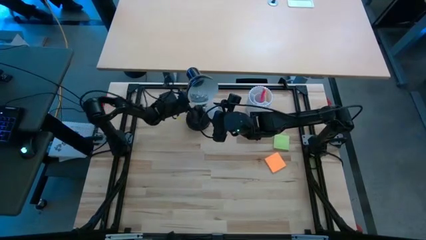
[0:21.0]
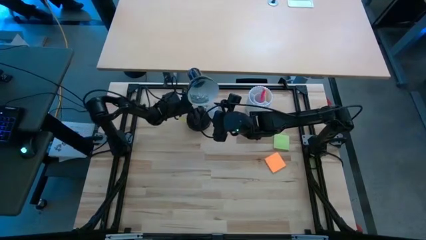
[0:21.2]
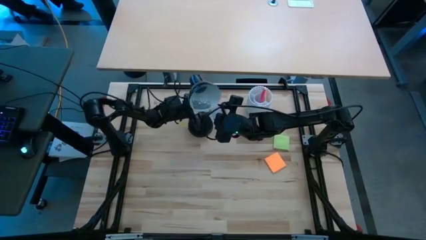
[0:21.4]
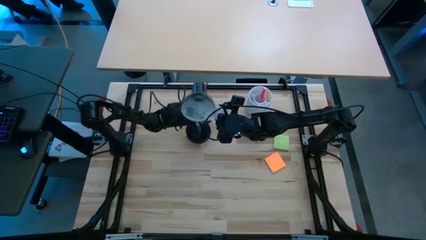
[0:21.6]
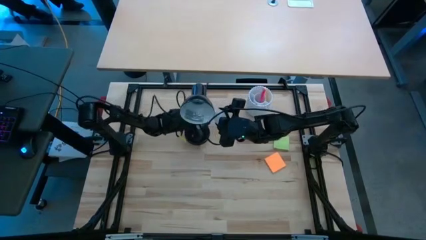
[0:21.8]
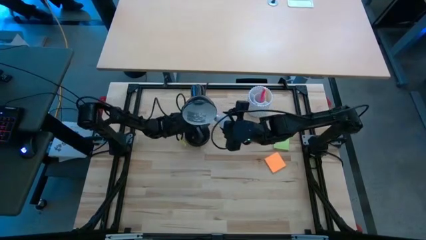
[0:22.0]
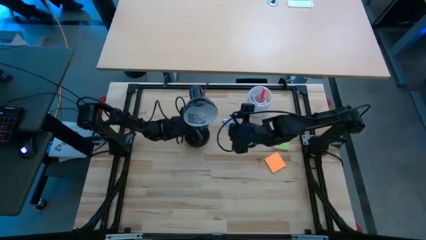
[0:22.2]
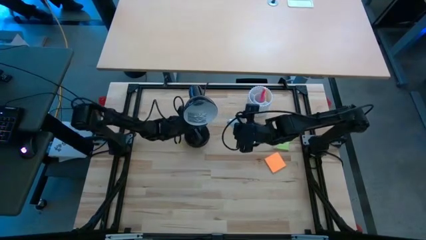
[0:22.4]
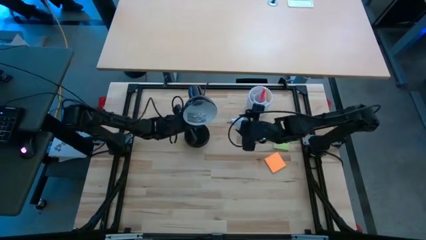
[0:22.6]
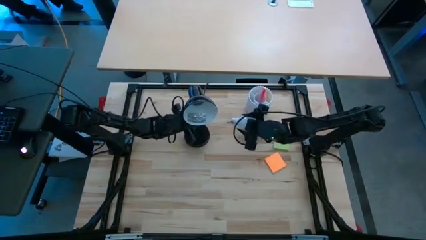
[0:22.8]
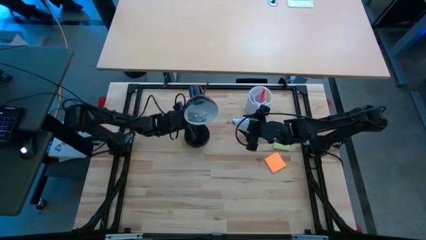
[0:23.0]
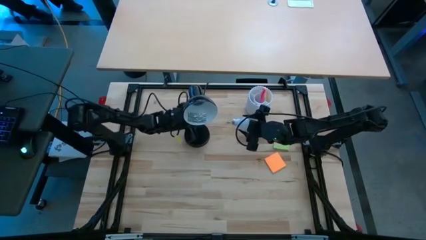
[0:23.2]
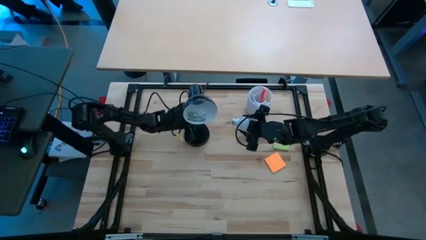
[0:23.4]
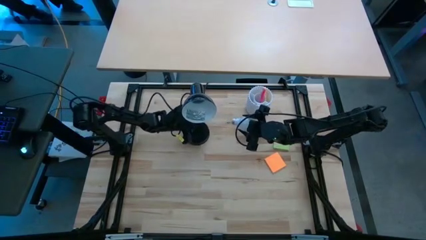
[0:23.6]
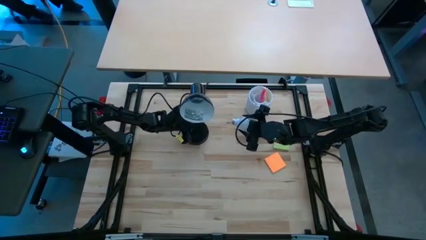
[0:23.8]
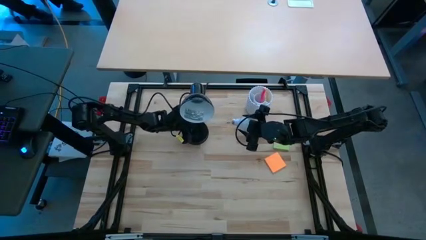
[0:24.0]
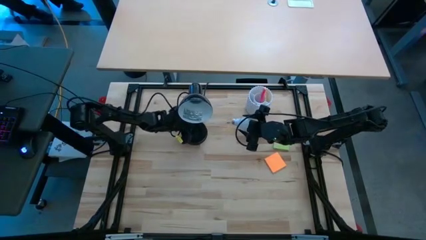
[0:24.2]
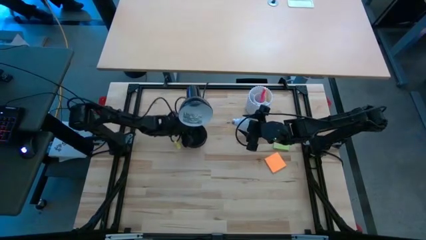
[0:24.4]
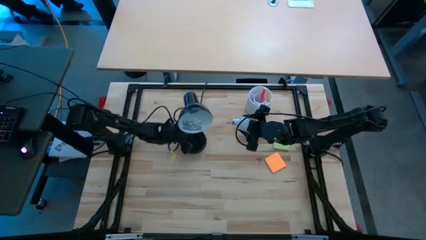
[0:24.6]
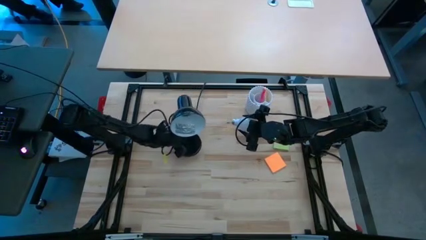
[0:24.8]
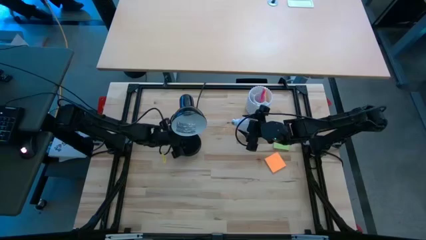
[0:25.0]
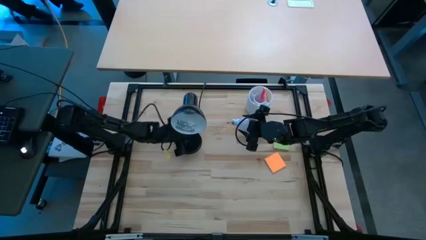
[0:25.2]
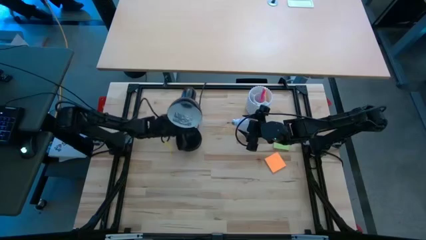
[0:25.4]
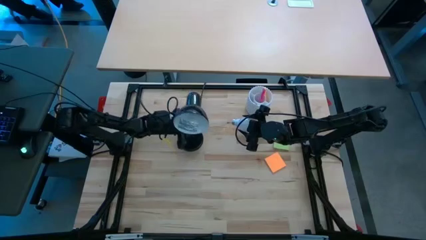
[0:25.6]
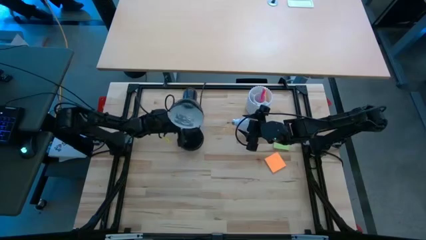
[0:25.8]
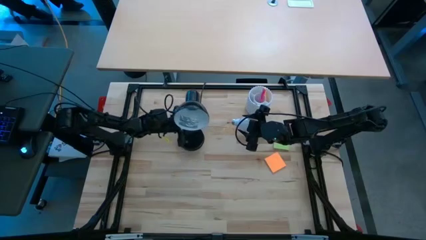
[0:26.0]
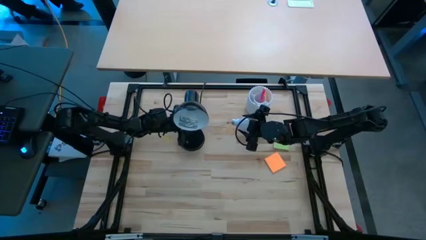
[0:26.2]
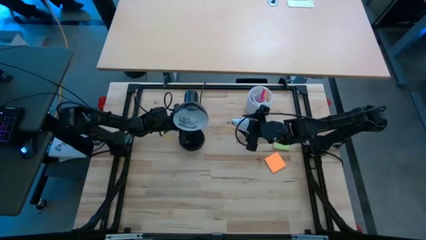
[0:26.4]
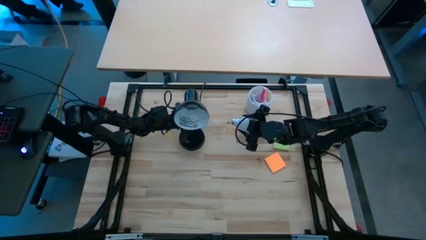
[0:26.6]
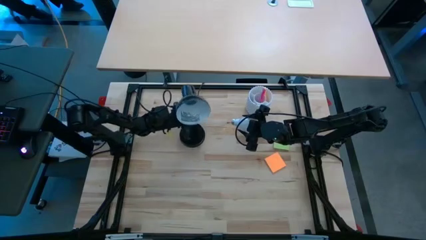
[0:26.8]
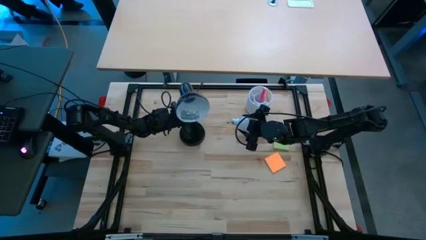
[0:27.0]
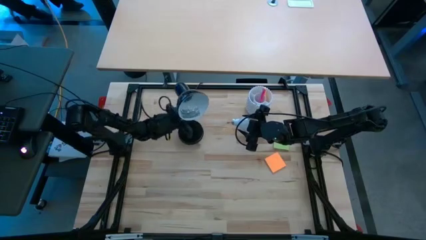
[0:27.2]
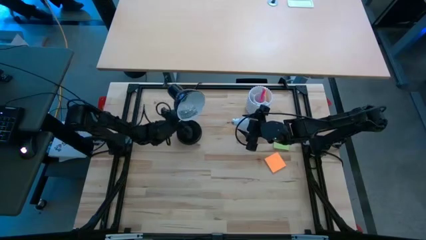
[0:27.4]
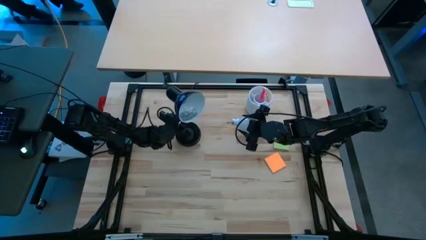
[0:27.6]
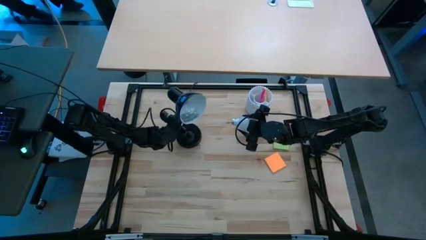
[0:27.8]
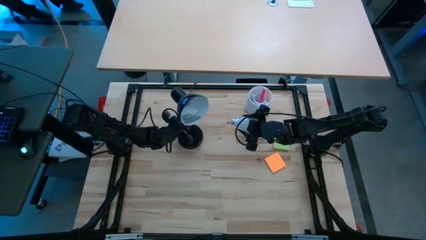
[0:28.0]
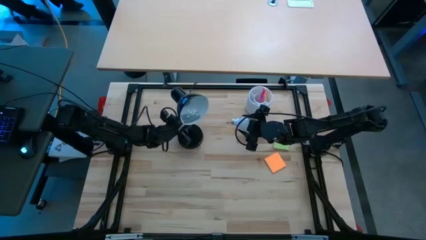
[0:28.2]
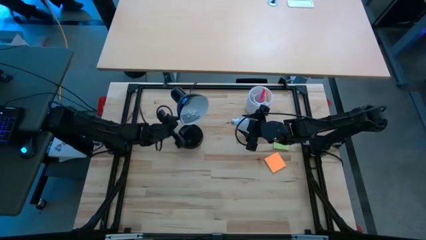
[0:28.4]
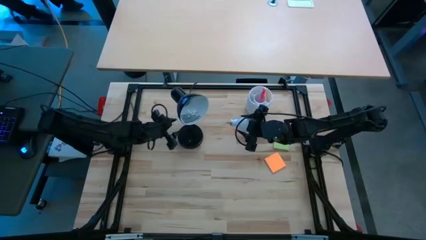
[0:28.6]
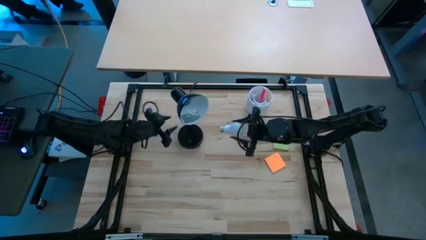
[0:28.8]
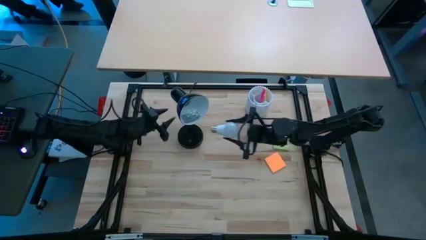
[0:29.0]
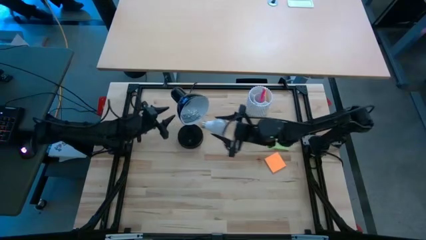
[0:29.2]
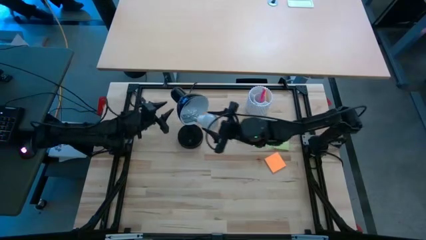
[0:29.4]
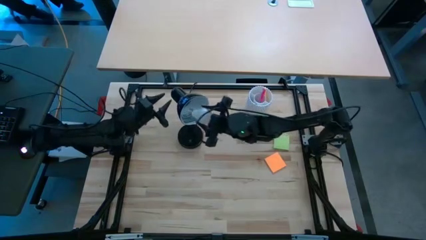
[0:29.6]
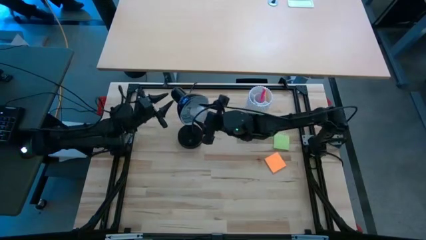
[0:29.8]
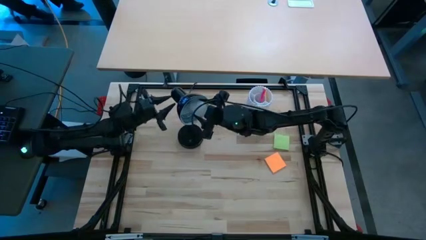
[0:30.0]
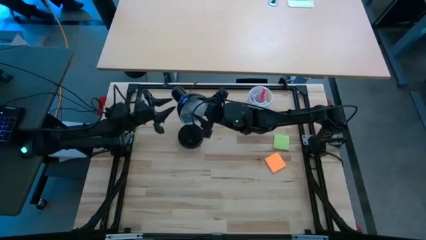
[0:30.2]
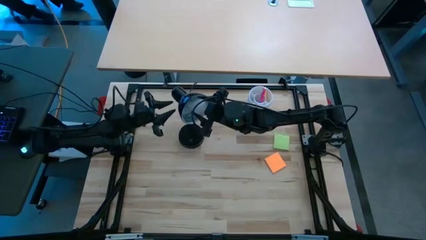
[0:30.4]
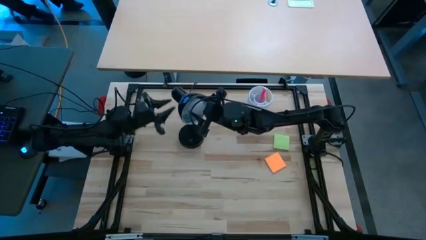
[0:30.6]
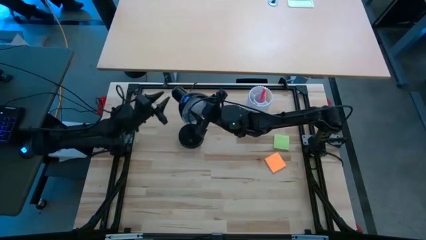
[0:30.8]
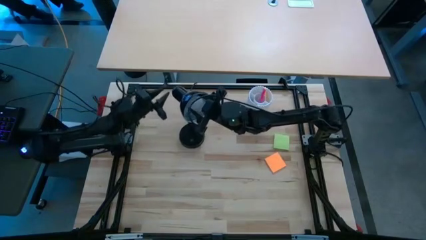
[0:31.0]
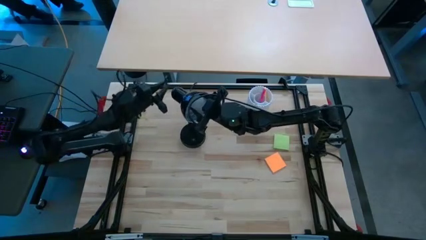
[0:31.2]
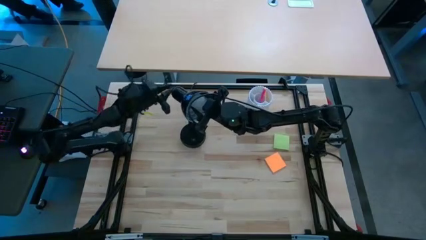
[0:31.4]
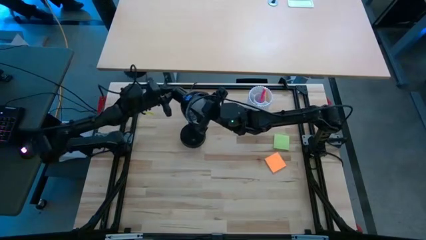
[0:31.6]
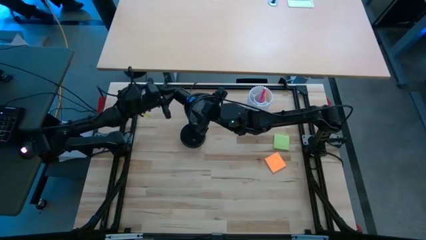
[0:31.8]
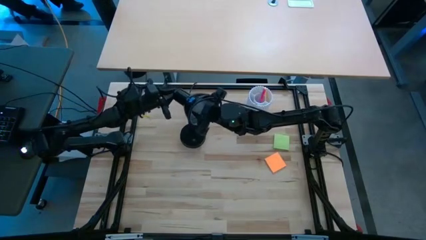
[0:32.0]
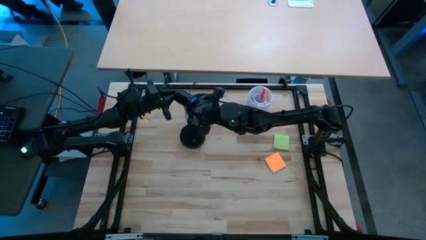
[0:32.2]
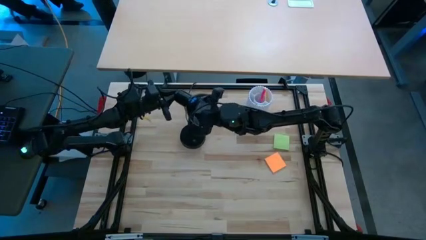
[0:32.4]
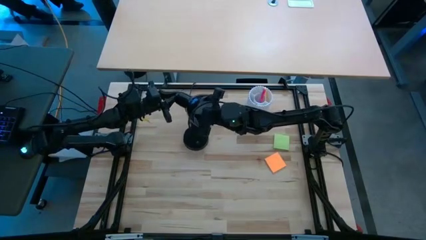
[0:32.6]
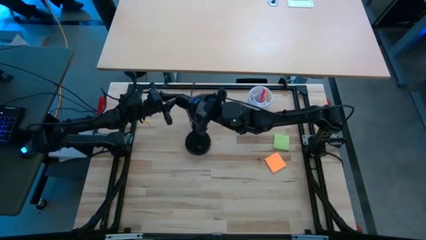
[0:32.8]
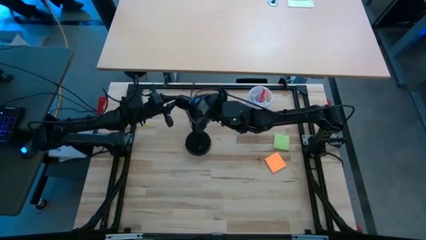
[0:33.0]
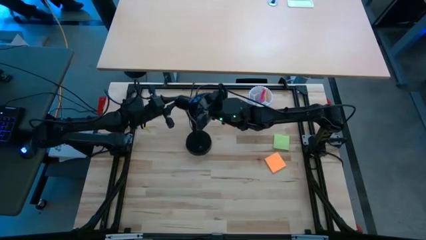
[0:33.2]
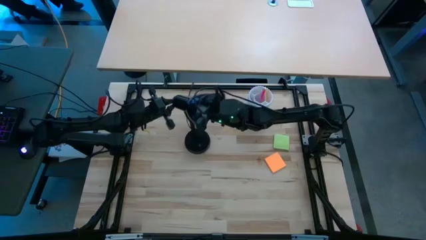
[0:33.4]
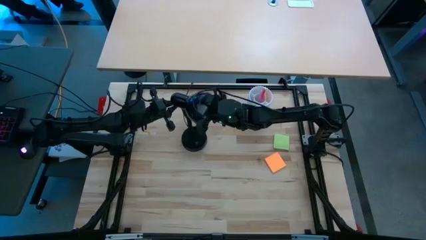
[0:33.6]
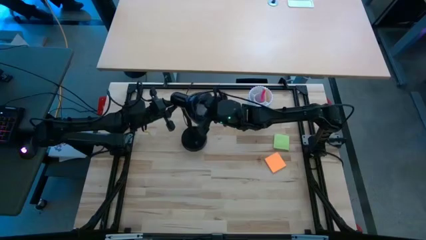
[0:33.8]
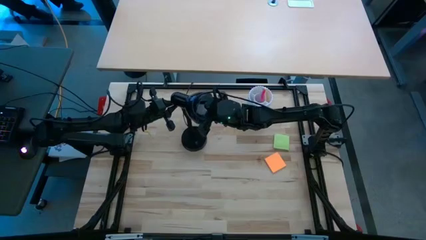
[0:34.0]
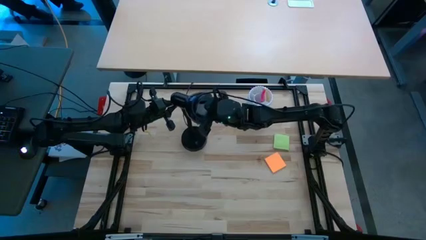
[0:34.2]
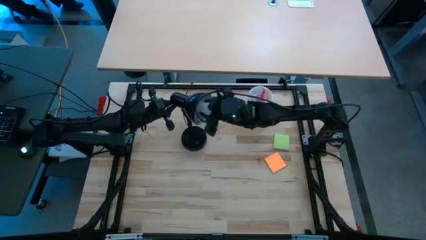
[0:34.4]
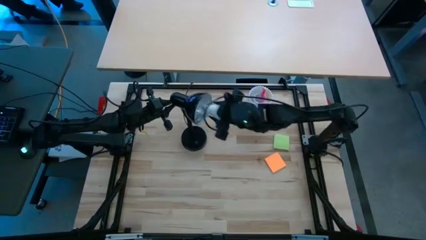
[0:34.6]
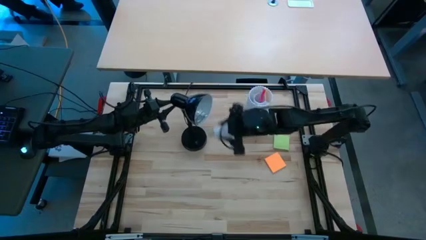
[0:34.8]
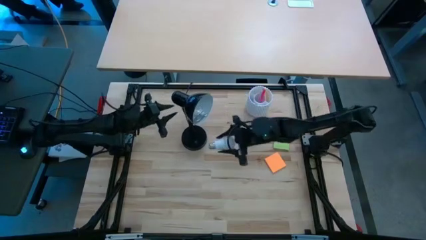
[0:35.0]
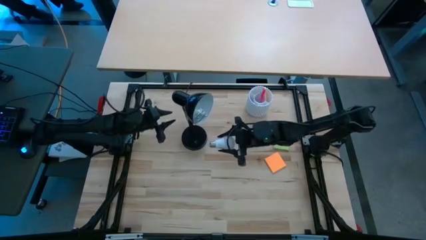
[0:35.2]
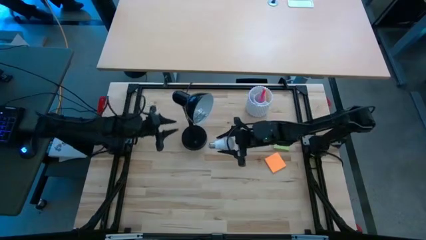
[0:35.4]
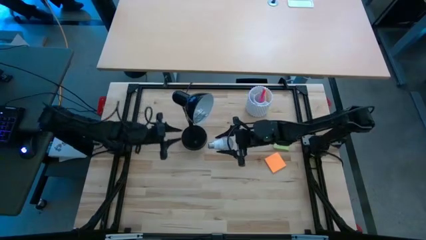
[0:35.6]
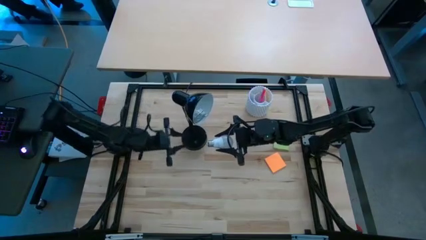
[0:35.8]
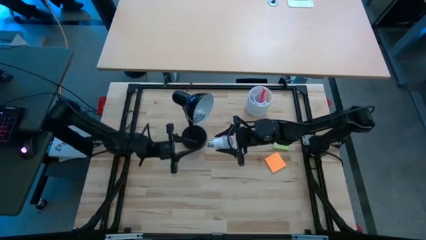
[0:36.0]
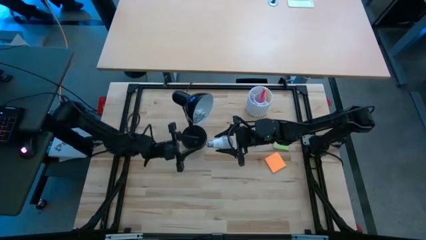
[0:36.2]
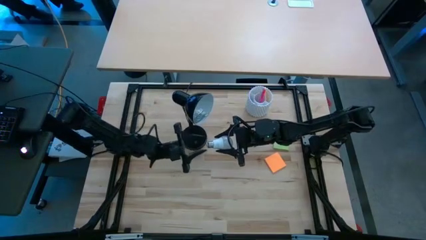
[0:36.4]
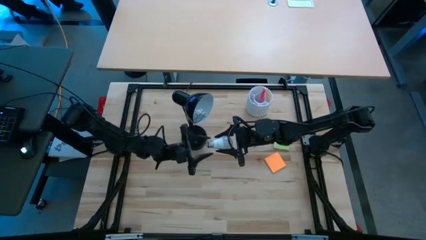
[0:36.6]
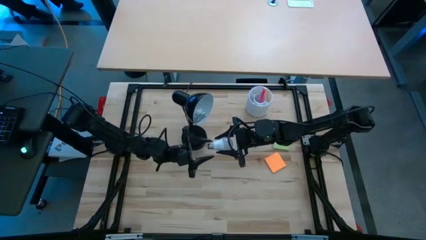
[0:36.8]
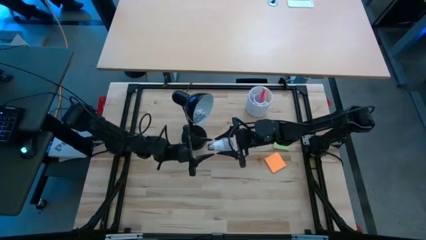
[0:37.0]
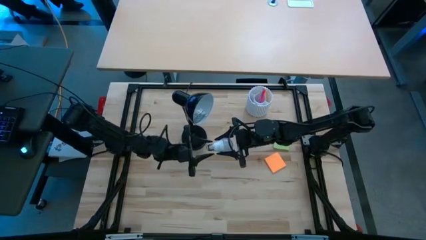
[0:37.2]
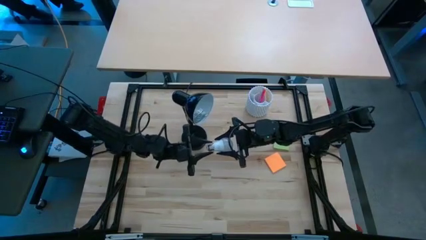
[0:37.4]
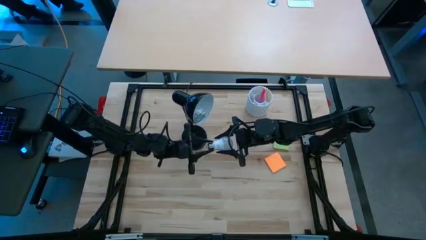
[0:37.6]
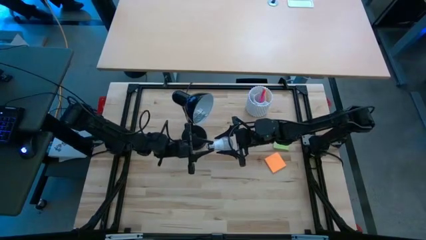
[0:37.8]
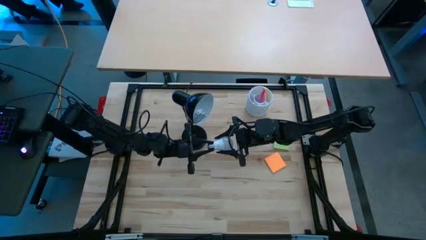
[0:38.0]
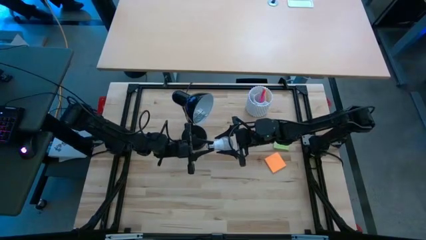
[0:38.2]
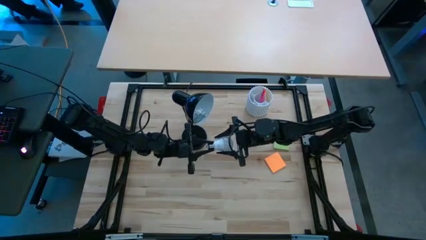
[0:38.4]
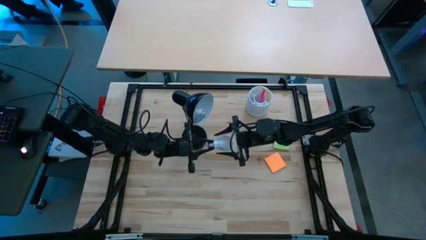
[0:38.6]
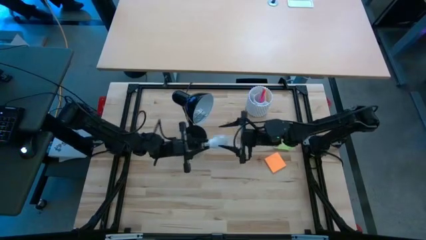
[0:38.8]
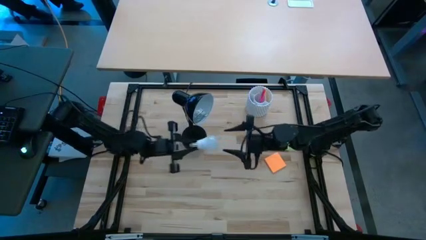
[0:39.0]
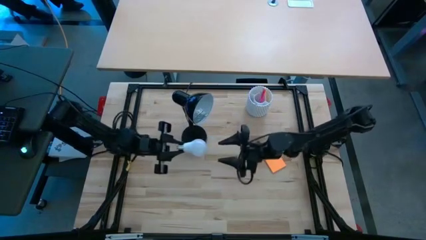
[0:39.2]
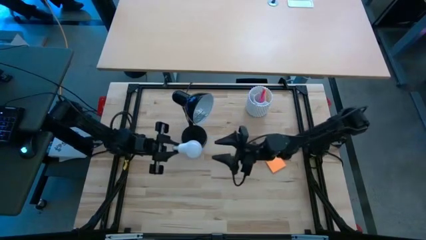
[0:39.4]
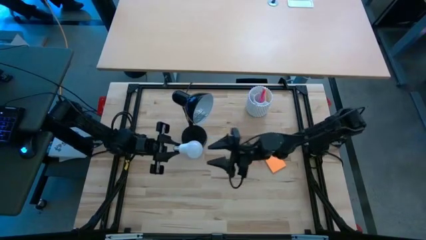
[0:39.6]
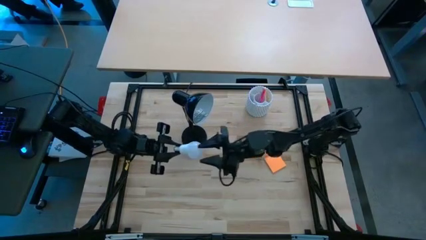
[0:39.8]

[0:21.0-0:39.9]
Task: Screw lightbulb
Insert the white lightbulb into the black lamp
